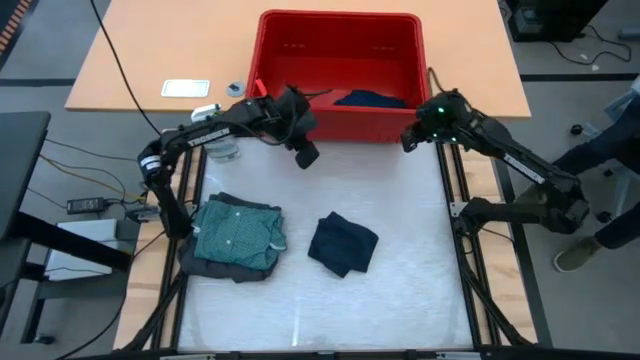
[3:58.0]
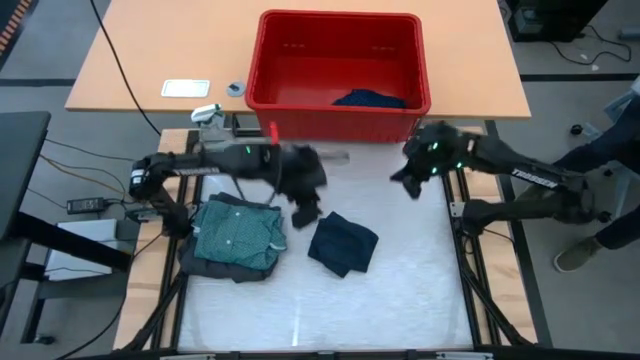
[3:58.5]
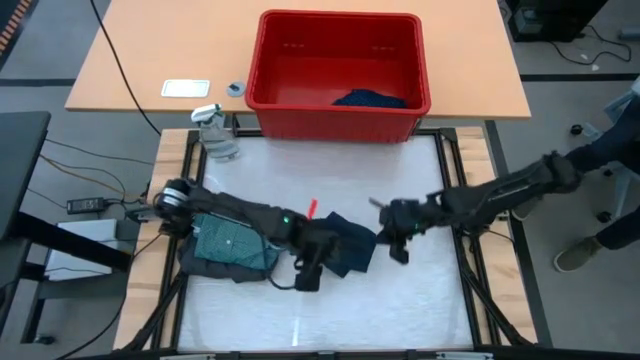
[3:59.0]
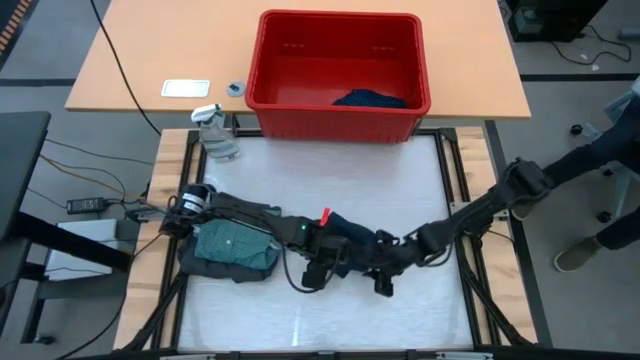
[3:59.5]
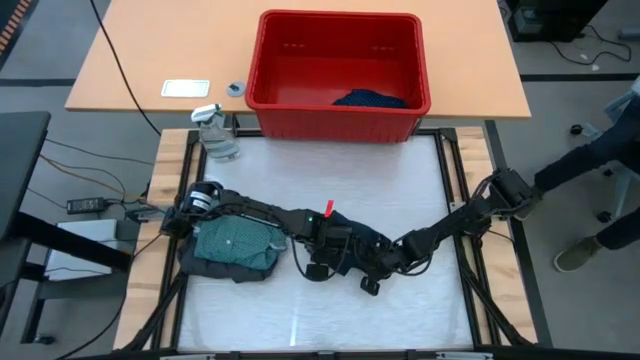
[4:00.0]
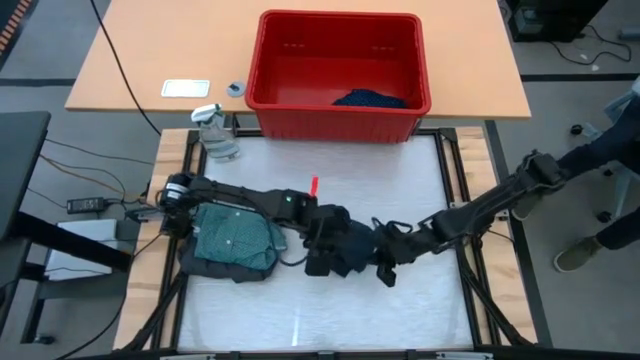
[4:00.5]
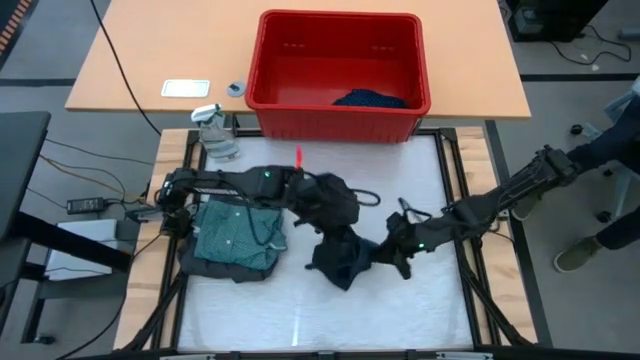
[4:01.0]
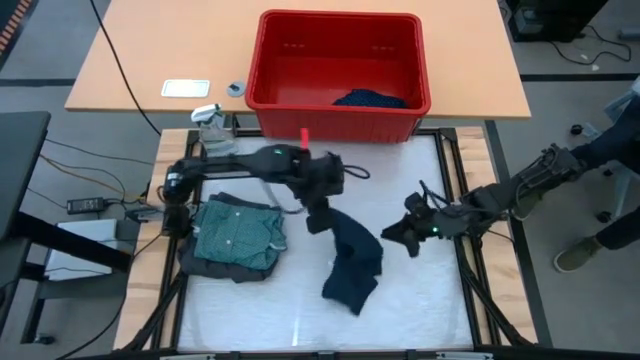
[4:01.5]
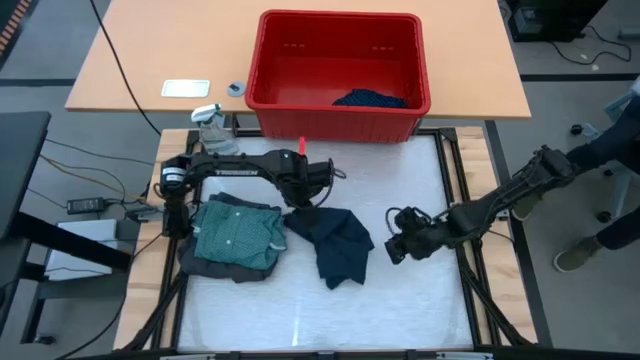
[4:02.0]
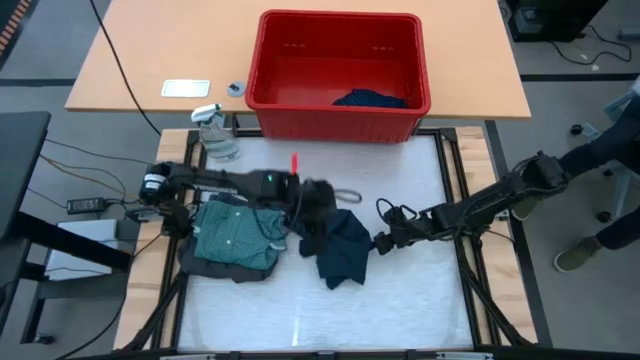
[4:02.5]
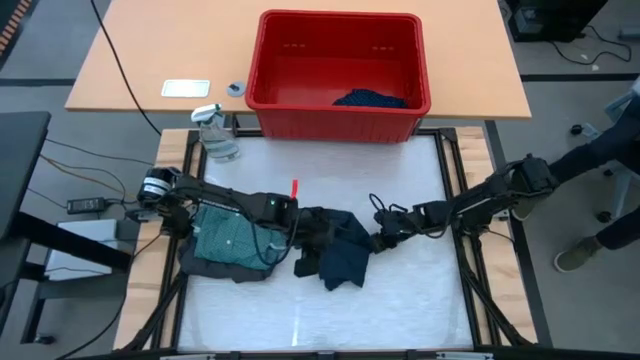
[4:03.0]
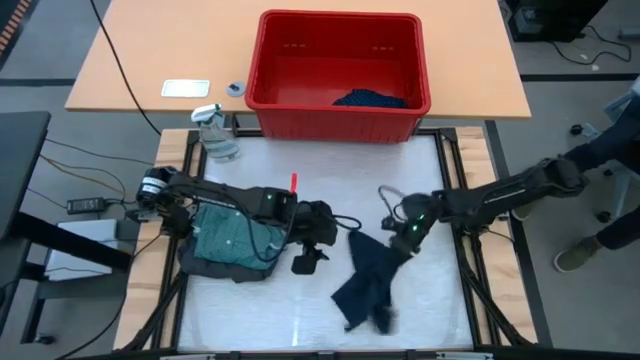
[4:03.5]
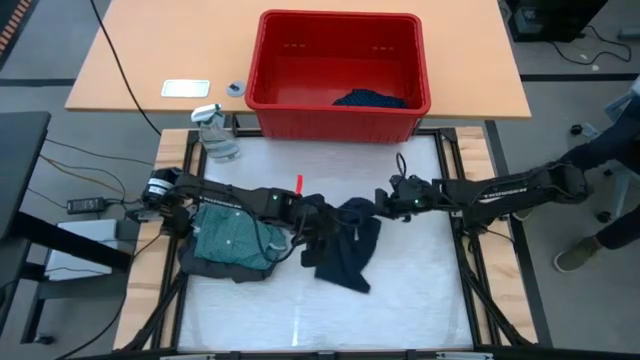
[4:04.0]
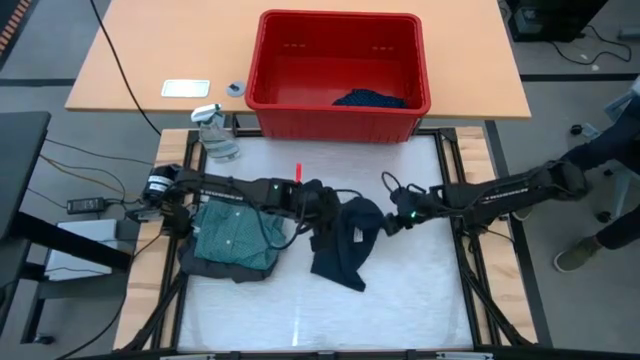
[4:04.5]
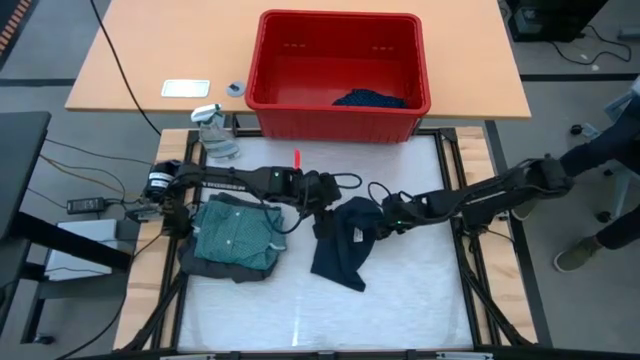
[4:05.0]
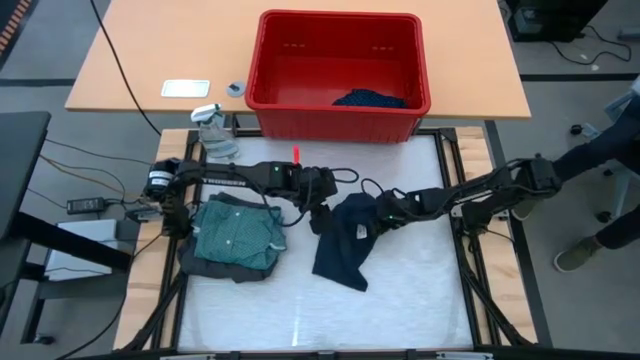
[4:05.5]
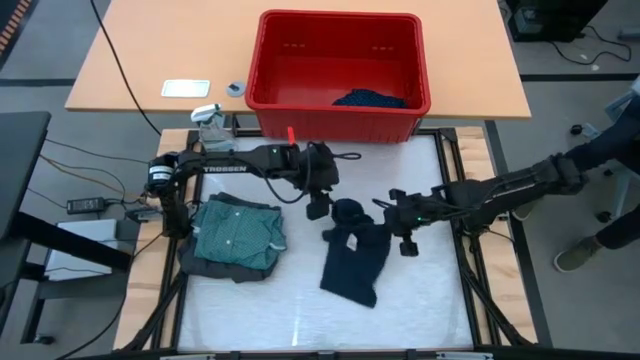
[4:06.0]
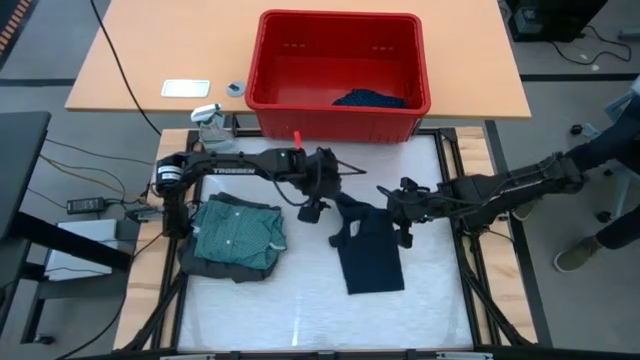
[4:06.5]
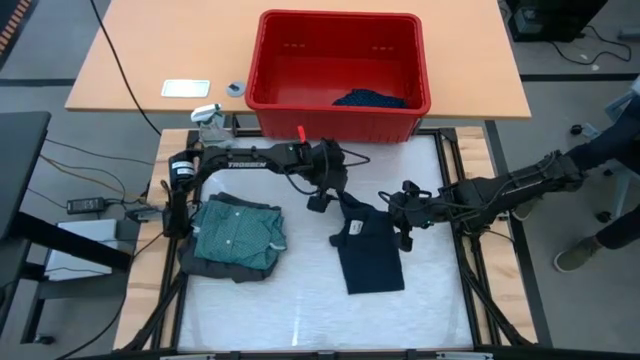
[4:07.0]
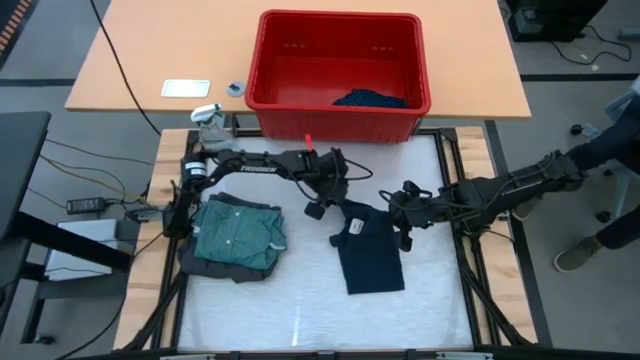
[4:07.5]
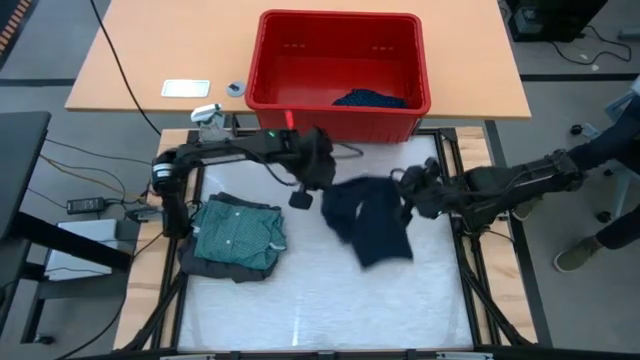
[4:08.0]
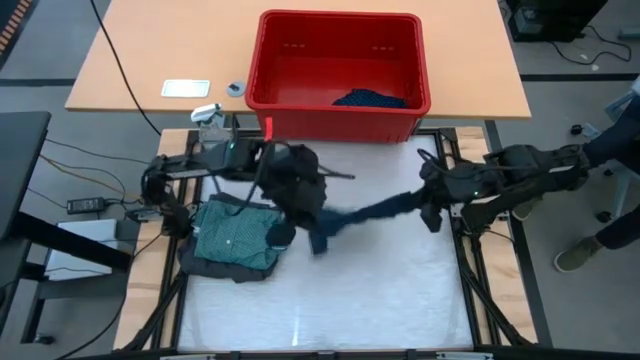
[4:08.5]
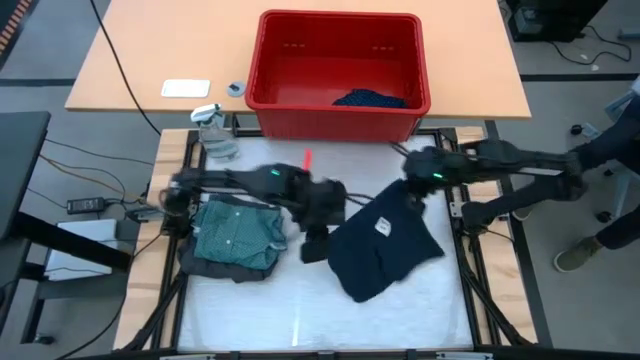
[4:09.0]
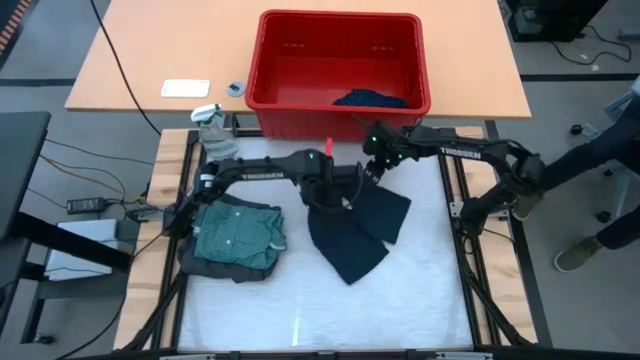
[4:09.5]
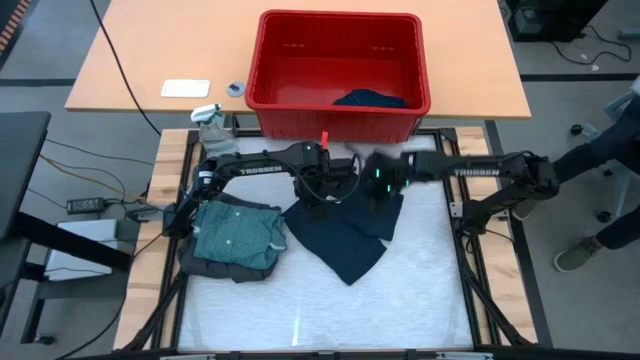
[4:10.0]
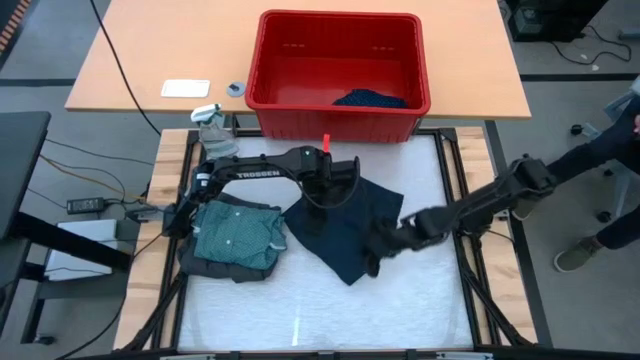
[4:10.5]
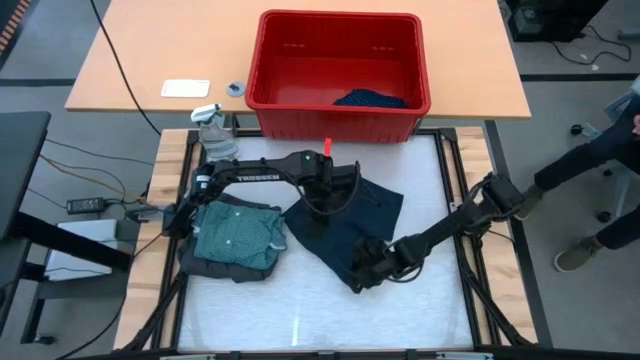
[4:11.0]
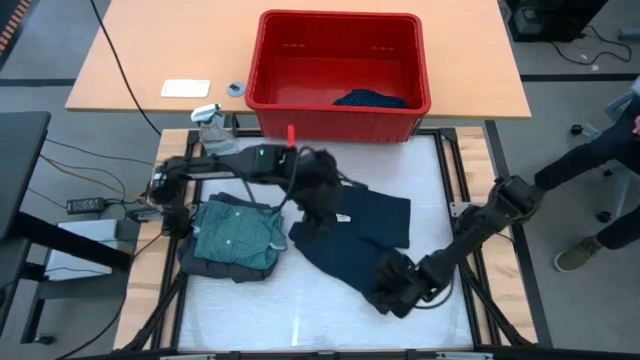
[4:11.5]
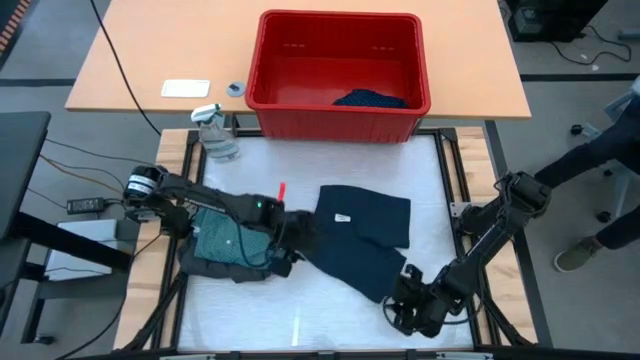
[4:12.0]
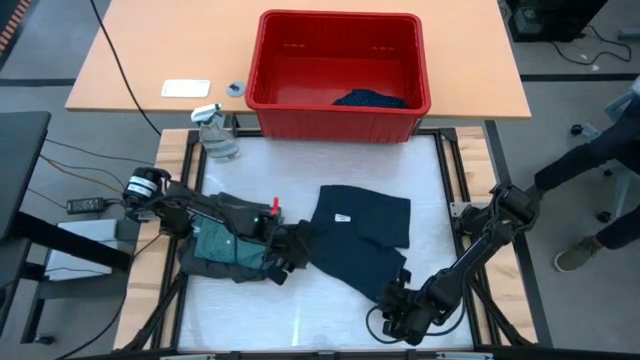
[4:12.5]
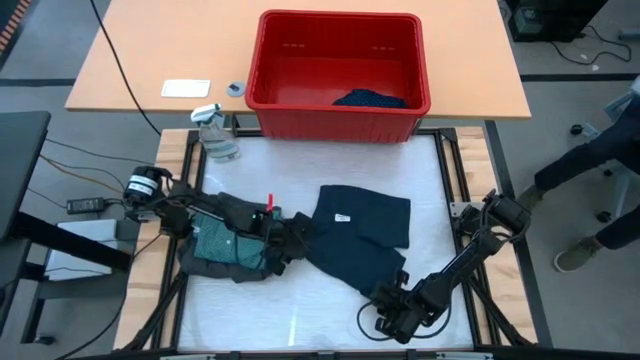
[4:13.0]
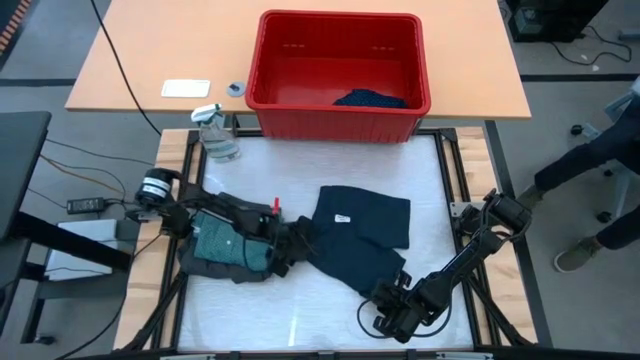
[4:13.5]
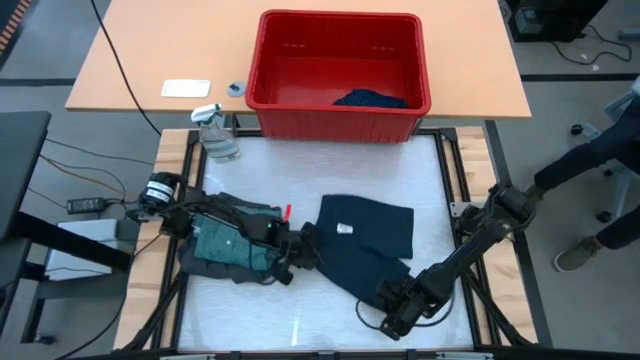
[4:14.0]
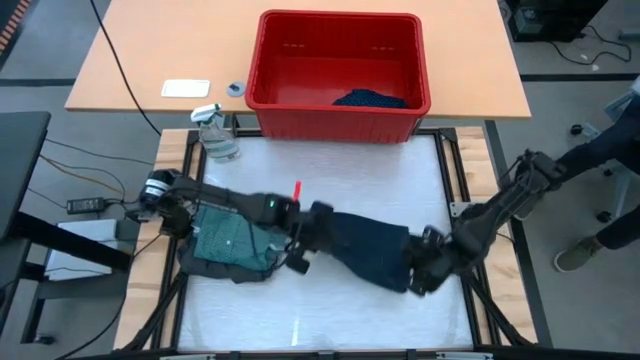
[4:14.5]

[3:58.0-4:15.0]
Task: Fold Laundry from Bin
Fold the dark blue short on the table

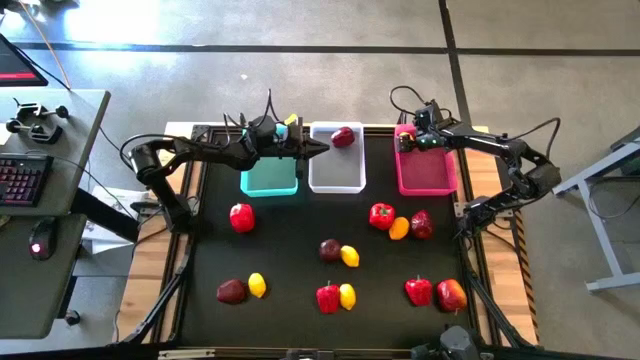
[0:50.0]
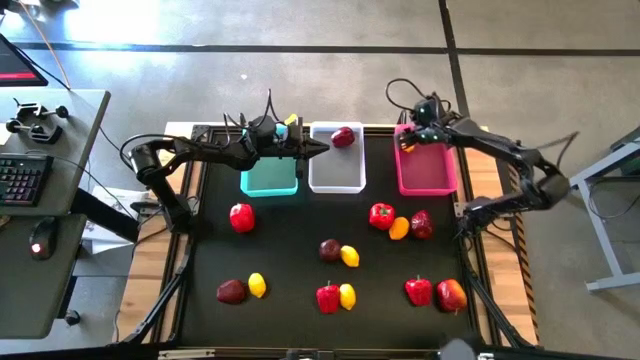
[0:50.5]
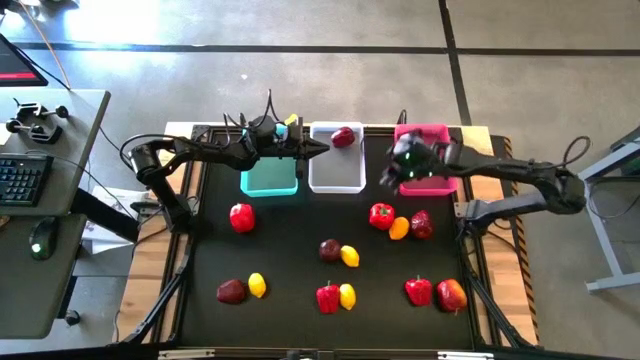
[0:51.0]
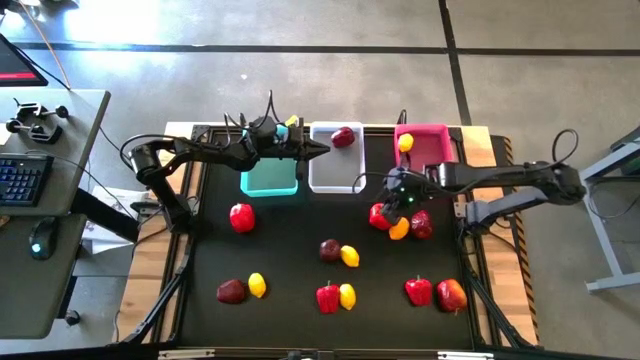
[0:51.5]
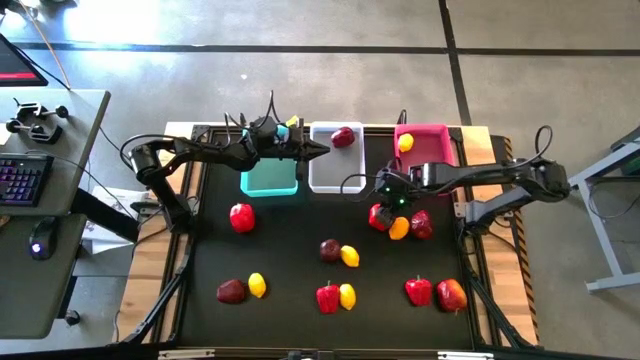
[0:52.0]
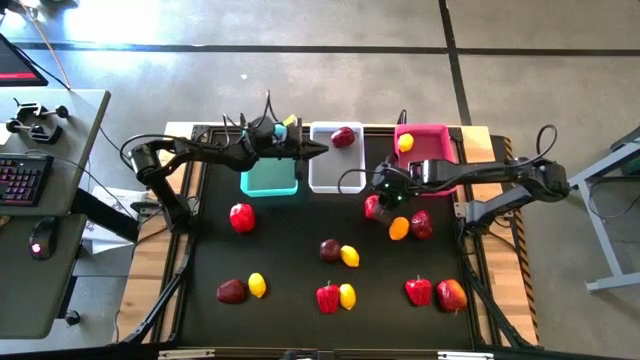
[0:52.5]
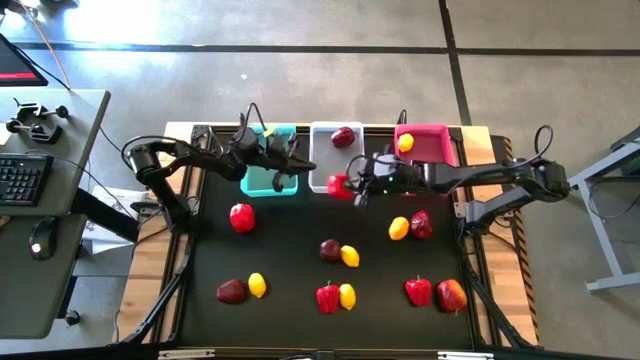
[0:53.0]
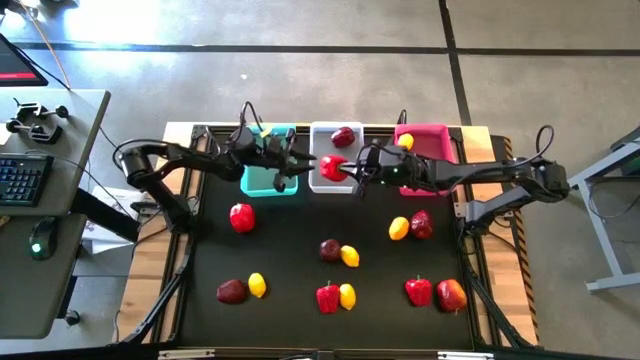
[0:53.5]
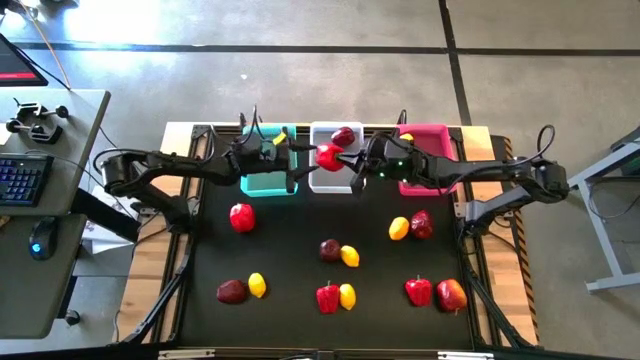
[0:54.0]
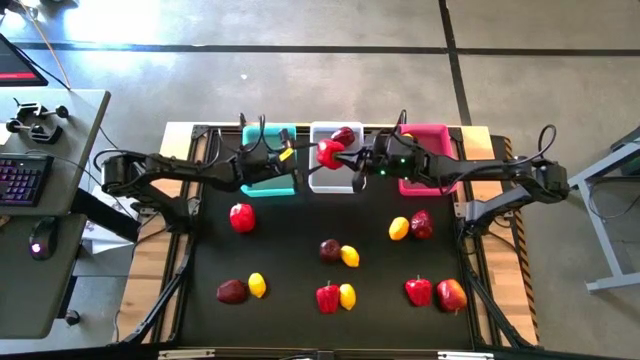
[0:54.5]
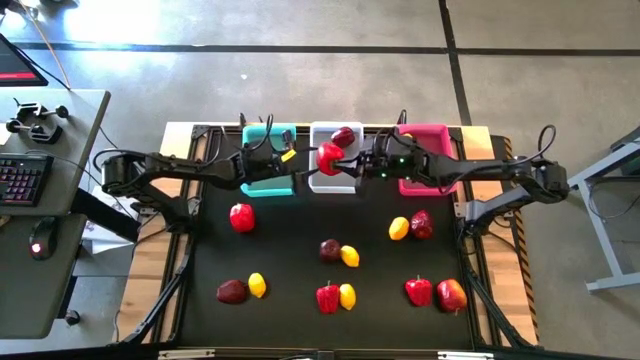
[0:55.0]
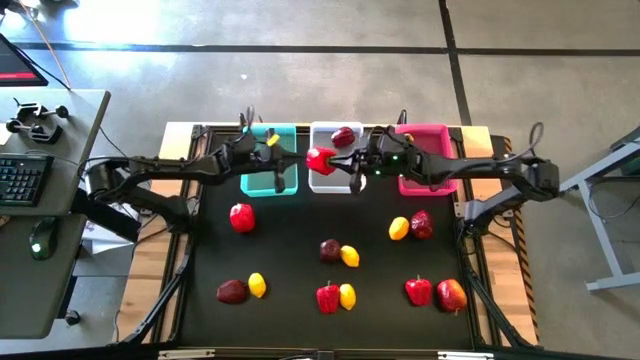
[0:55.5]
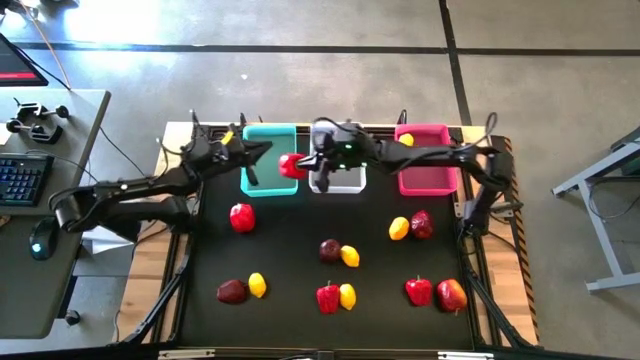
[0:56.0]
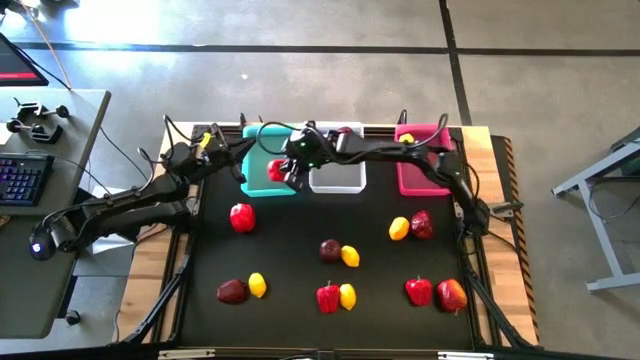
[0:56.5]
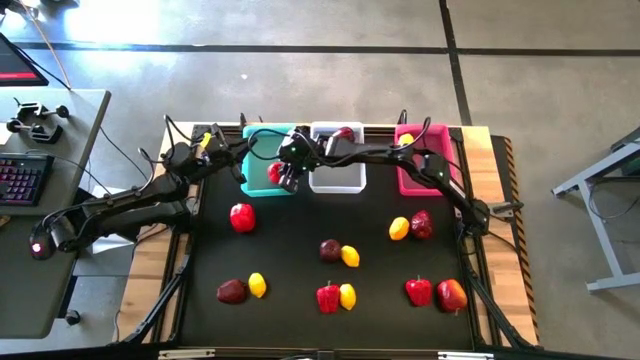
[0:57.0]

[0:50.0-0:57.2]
Task: Sort produce into baskets
Put the bell pepper into the green bin
